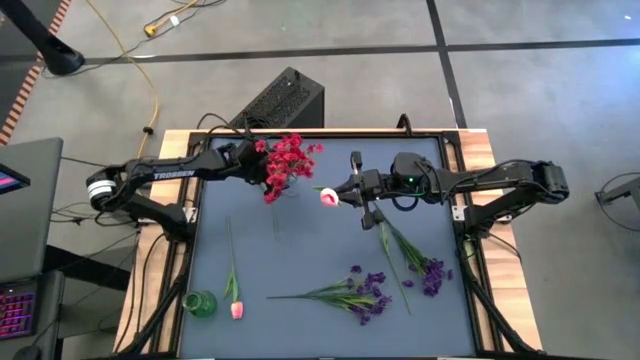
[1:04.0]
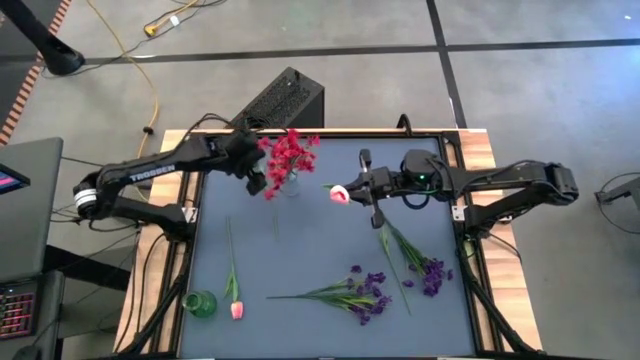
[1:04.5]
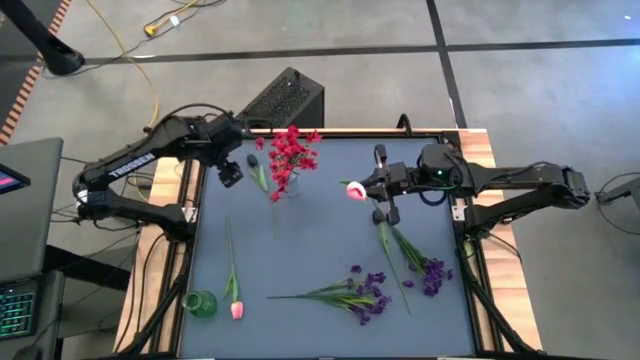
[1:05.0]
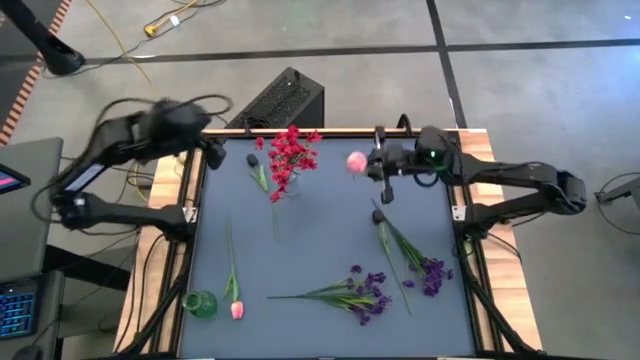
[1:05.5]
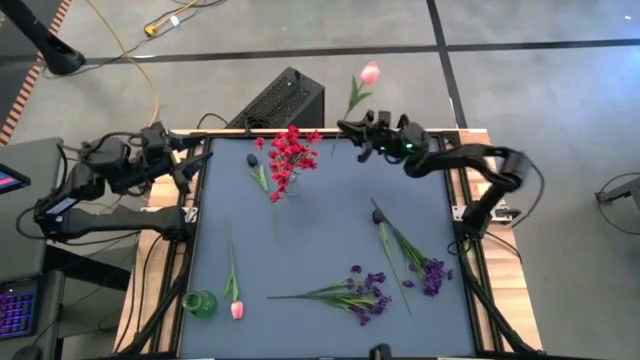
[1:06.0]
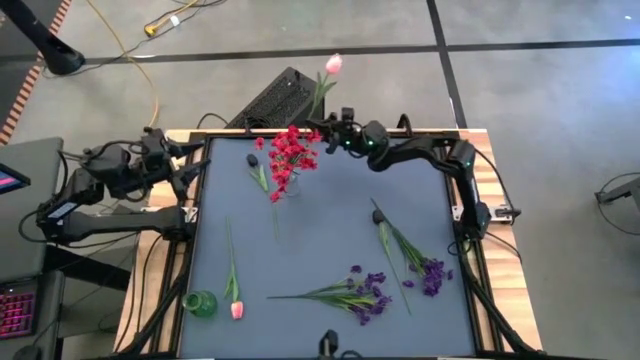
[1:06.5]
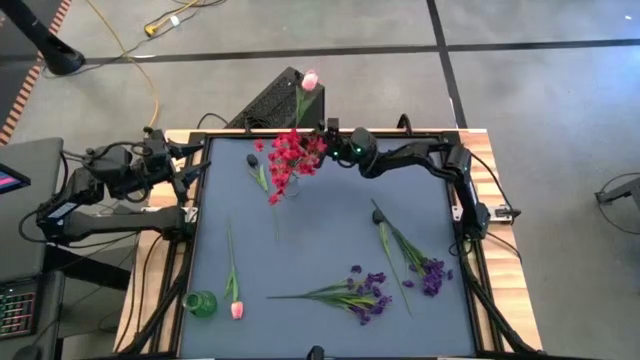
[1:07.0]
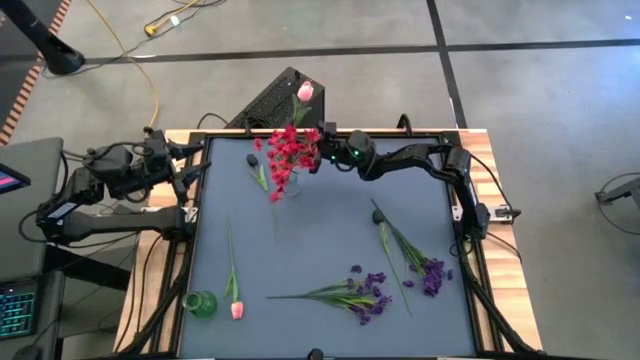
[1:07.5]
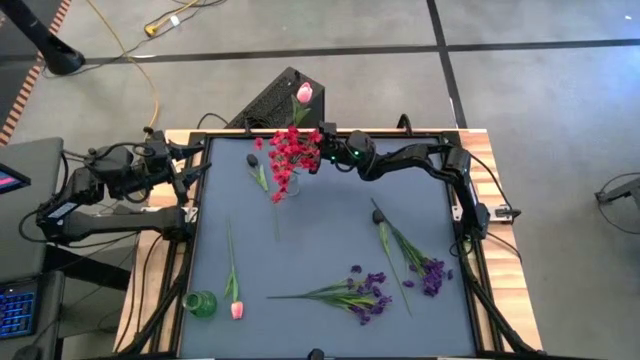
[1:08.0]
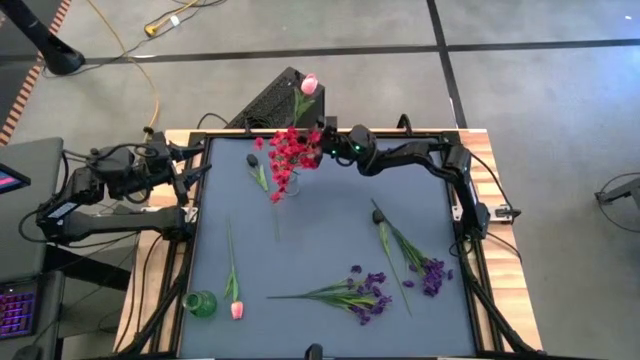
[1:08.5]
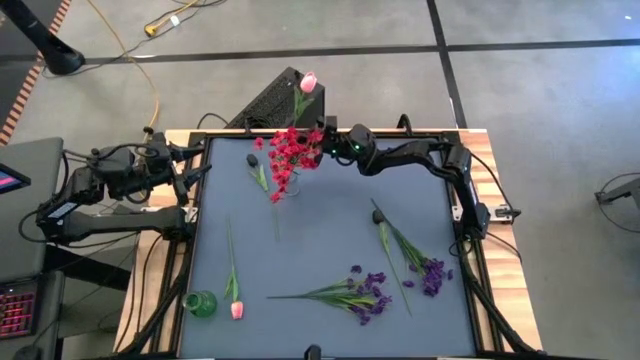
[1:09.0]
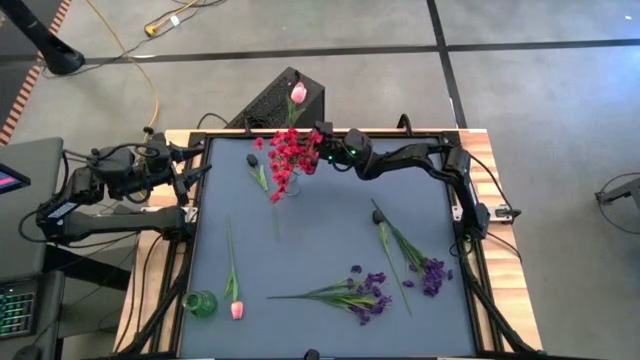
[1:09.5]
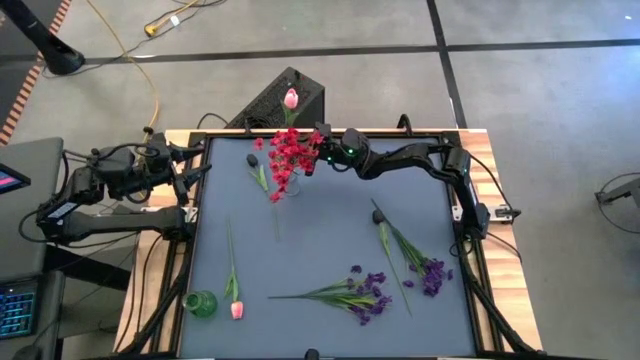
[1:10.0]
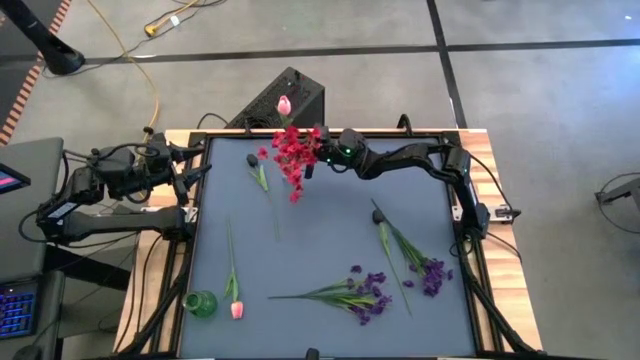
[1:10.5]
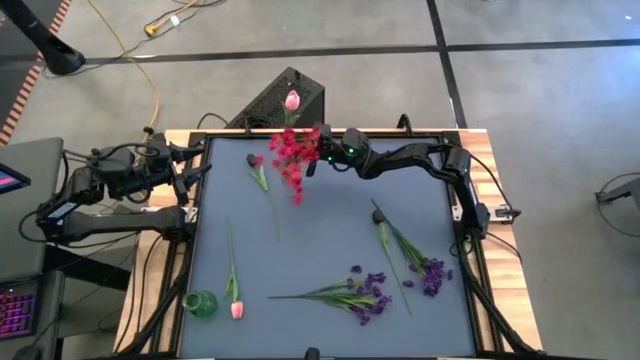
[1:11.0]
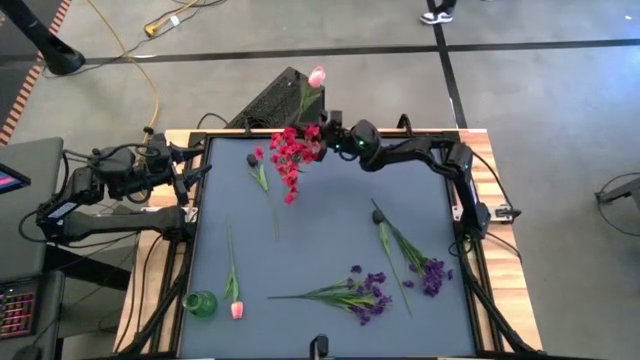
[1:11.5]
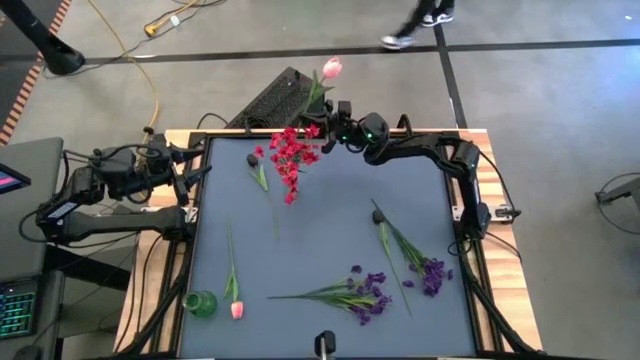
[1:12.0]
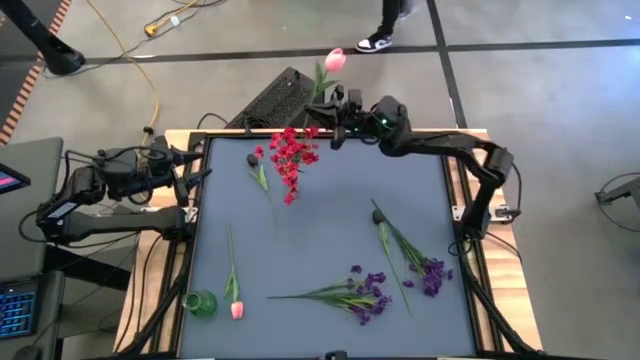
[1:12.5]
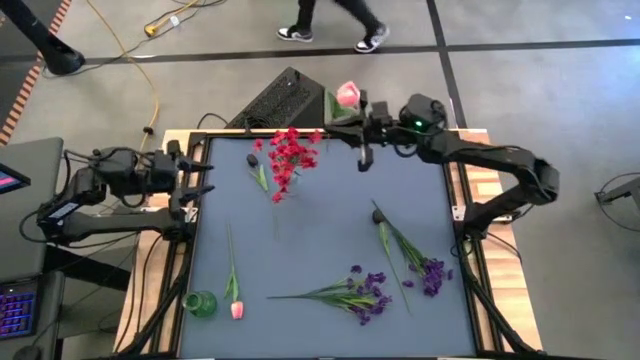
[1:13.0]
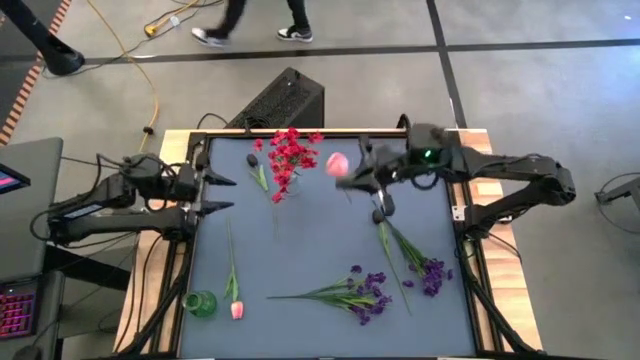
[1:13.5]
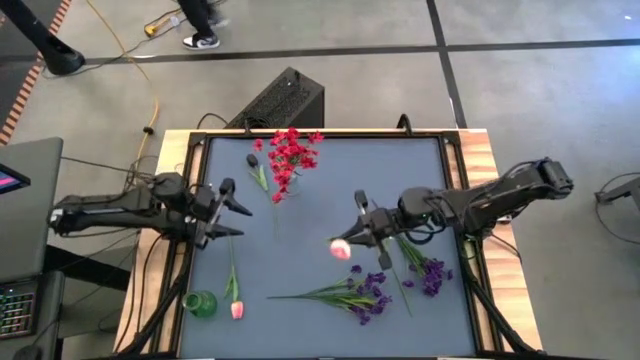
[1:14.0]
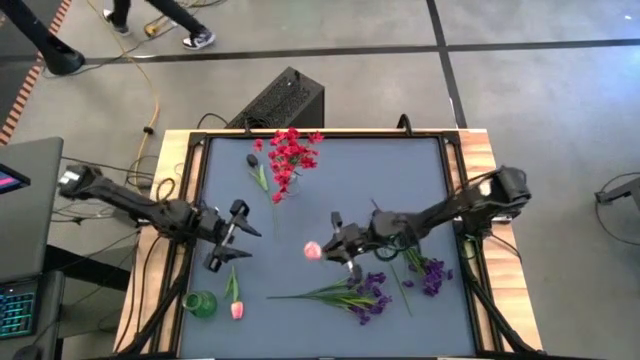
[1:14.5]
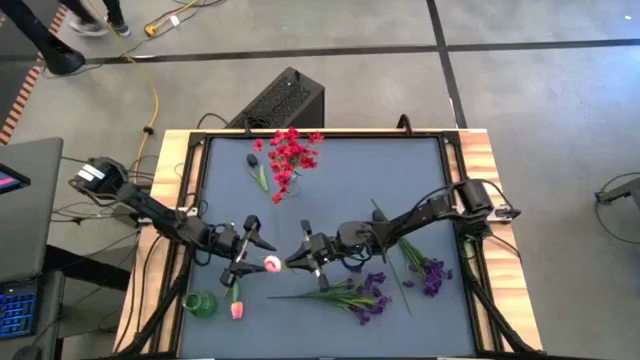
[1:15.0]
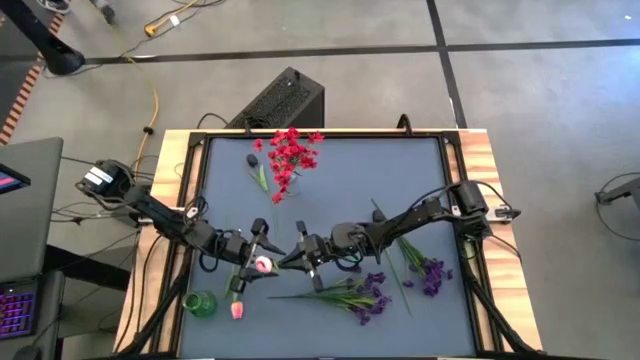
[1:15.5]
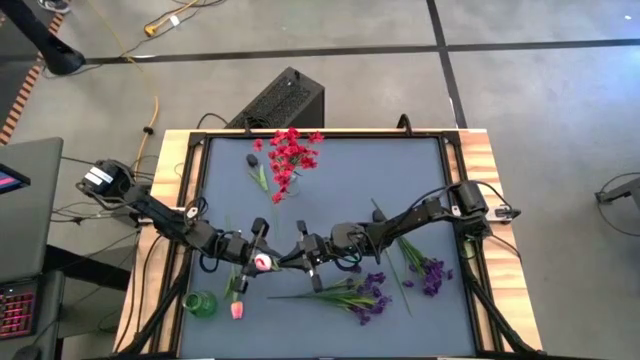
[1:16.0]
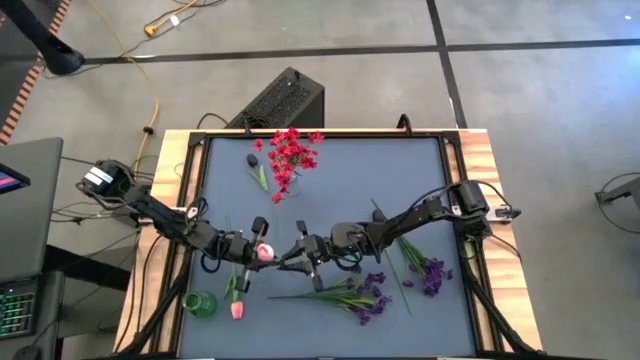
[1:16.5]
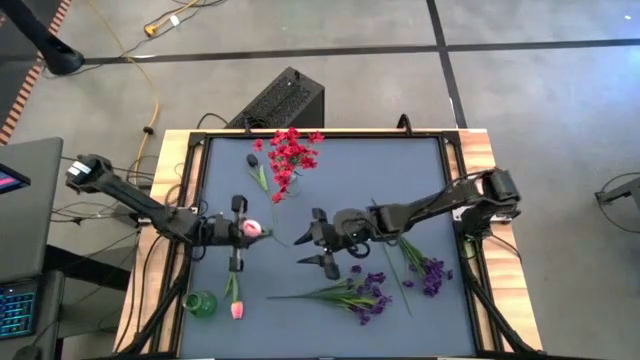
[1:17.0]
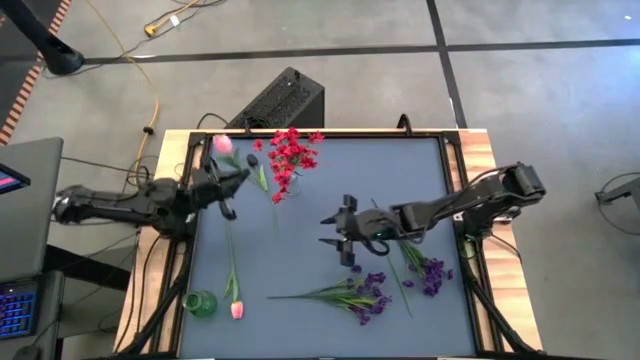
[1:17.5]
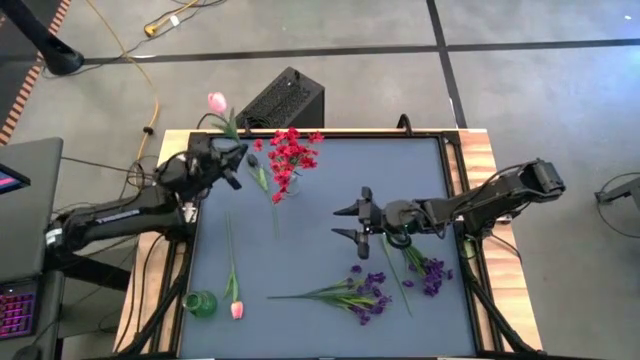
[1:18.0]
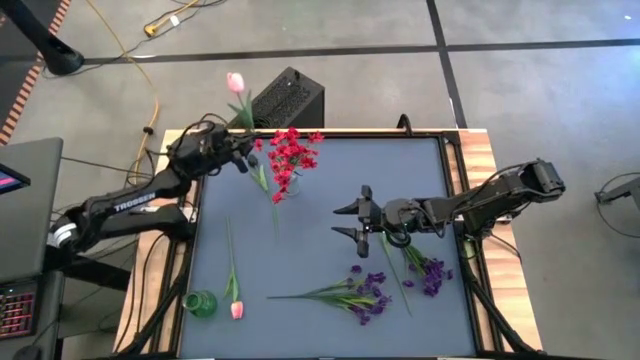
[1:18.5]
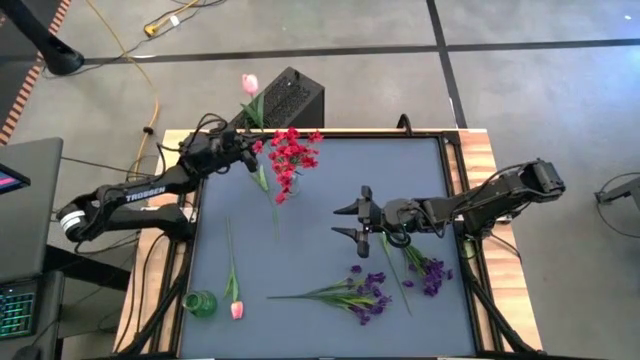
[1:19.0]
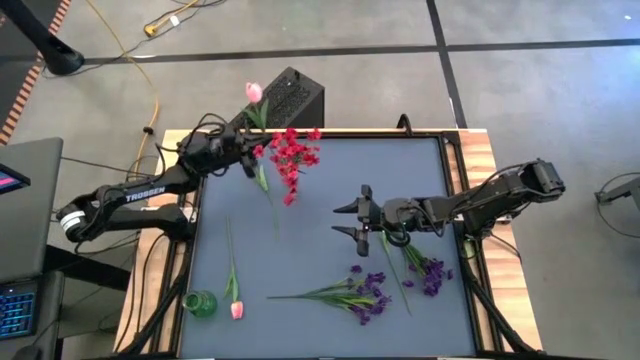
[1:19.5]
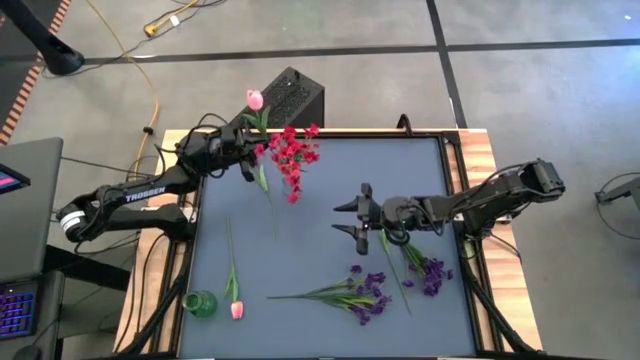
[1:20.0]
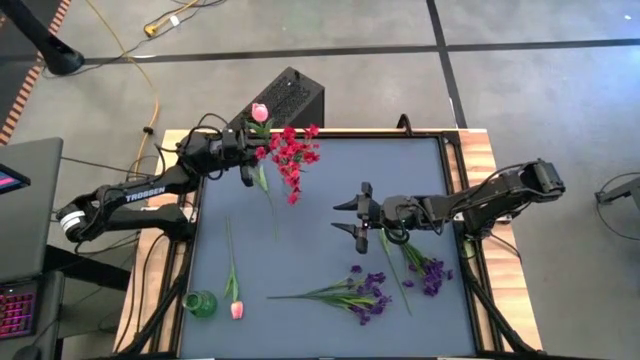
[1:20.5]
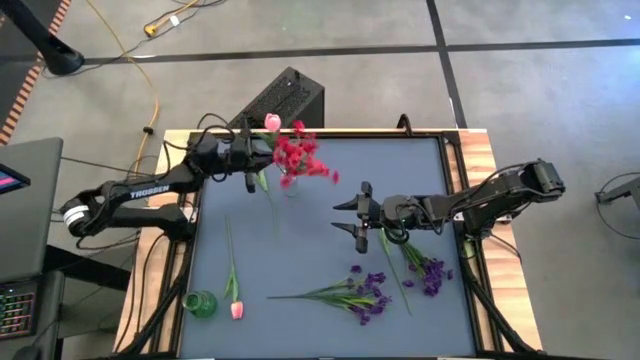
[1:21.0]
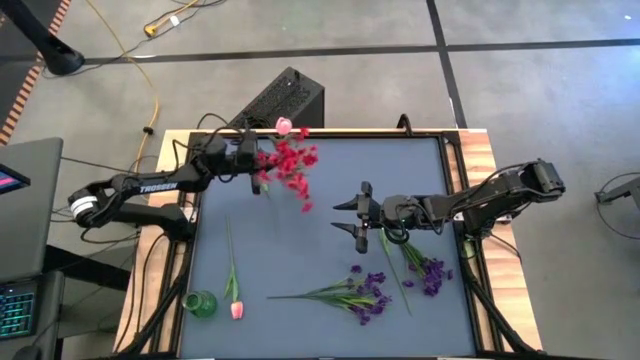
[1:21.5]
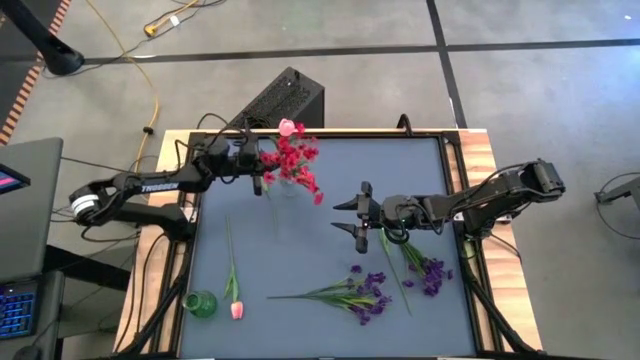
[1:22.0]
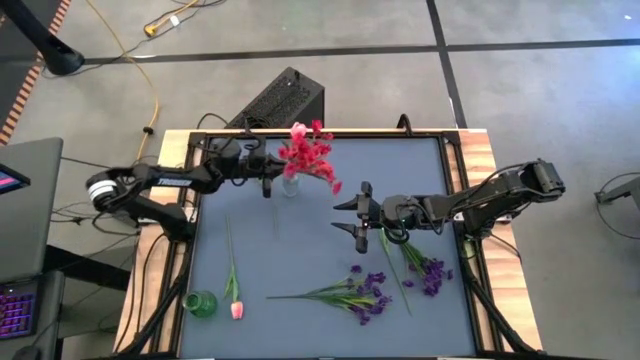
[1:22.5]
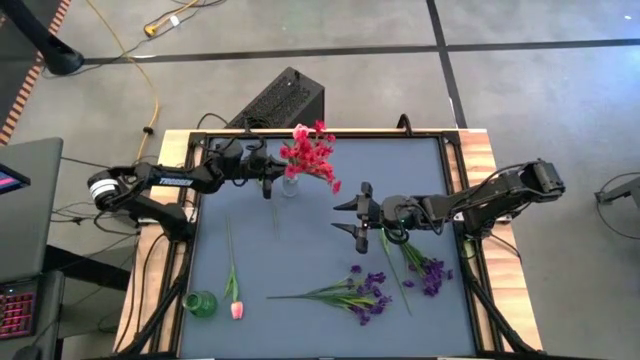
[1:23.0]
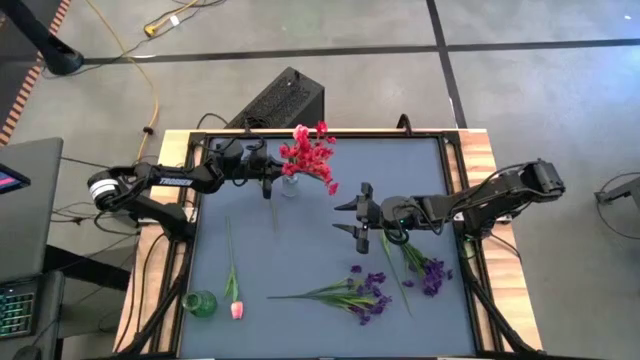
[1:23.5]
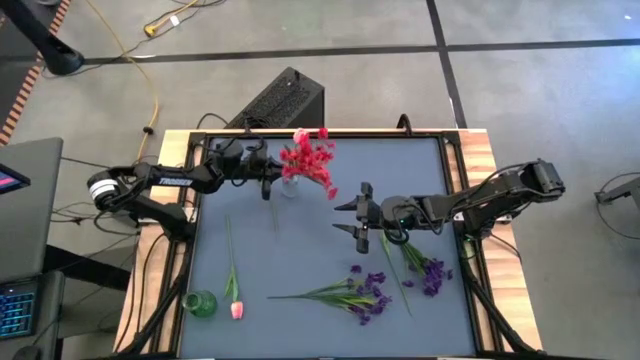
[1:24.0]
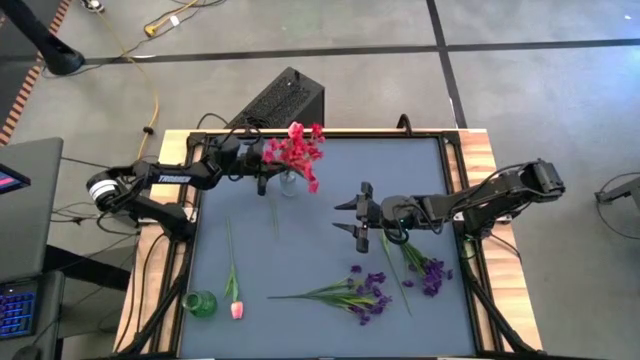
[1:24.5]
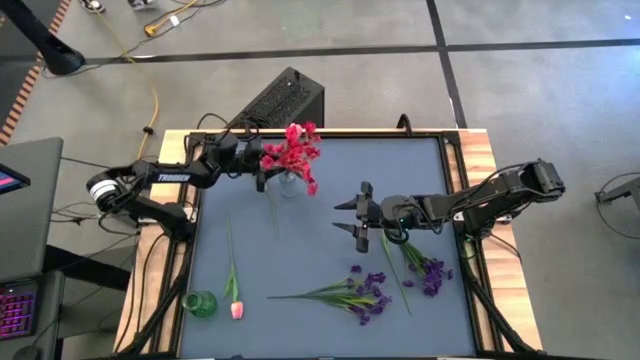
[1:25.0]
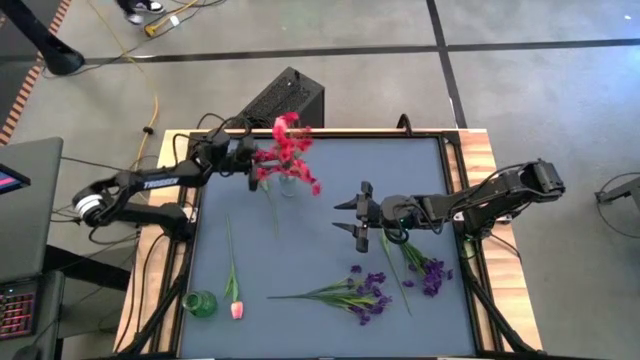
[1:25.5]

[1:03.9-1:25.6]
Task: Sort flowers into vase by color
Put the top pink tulip into the transparent vase
